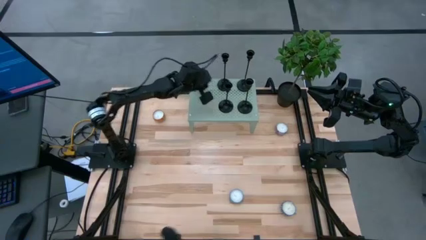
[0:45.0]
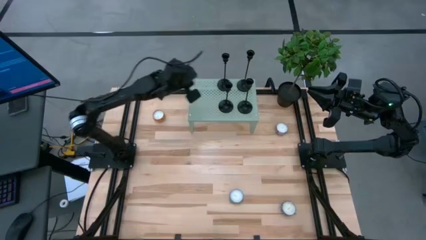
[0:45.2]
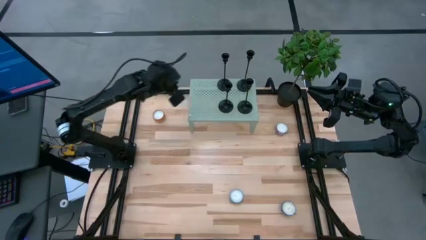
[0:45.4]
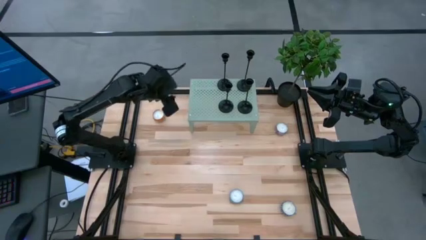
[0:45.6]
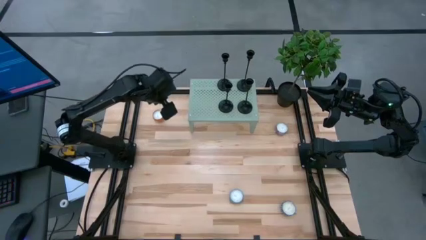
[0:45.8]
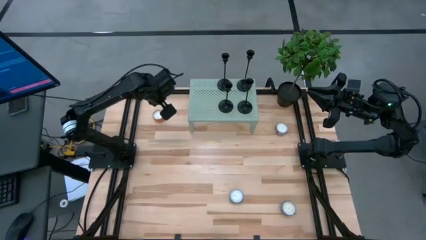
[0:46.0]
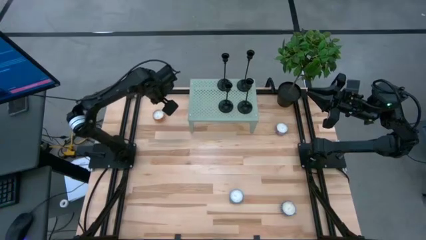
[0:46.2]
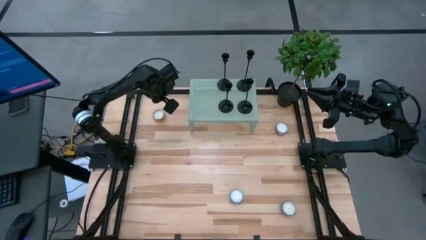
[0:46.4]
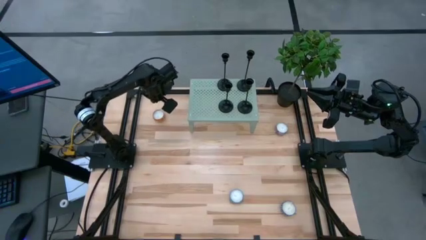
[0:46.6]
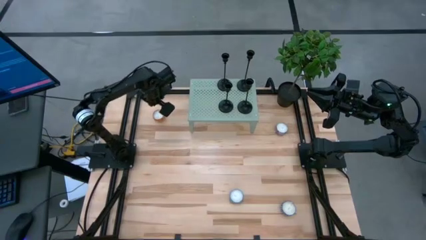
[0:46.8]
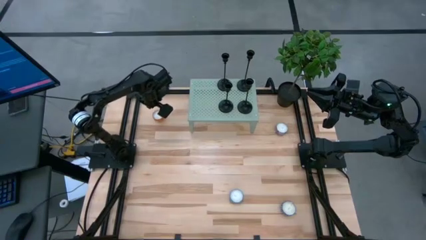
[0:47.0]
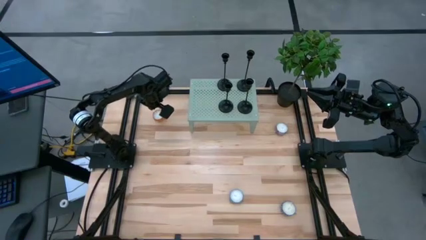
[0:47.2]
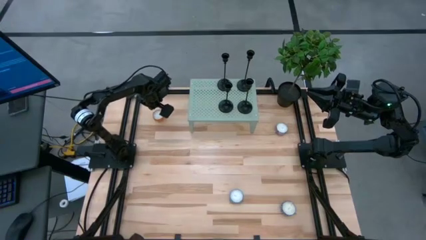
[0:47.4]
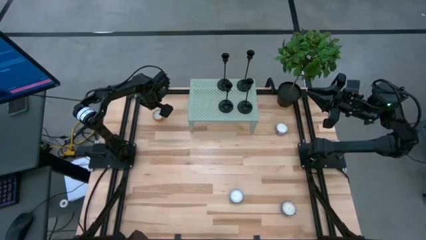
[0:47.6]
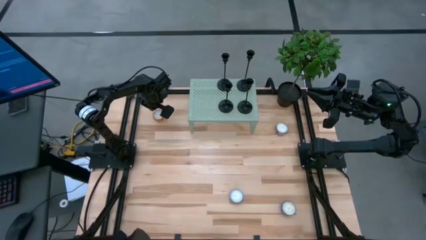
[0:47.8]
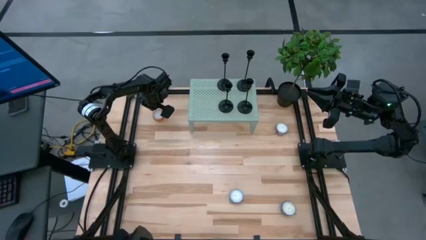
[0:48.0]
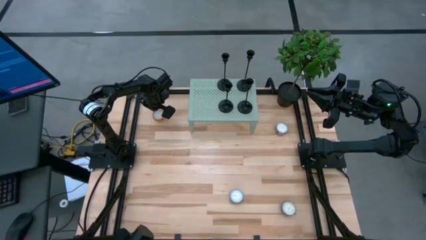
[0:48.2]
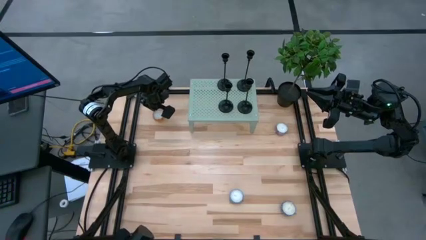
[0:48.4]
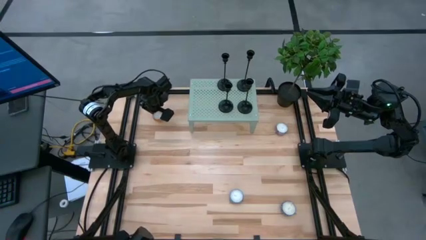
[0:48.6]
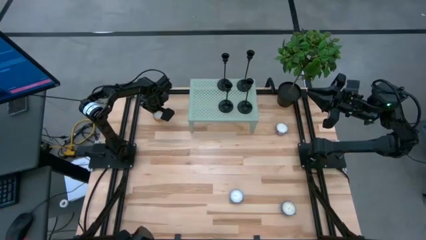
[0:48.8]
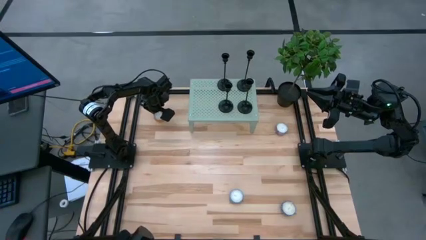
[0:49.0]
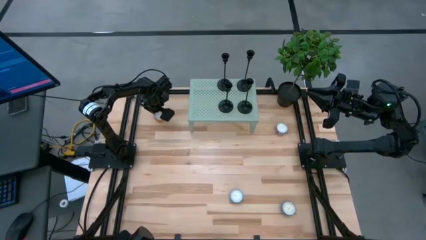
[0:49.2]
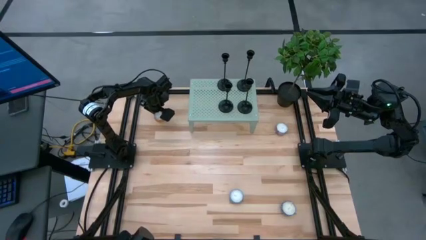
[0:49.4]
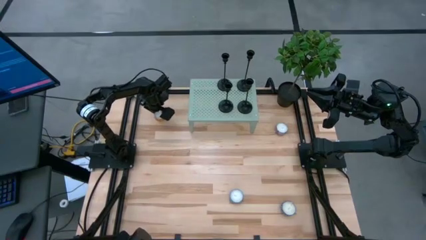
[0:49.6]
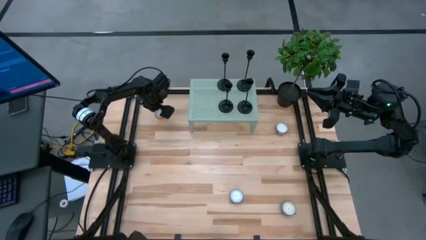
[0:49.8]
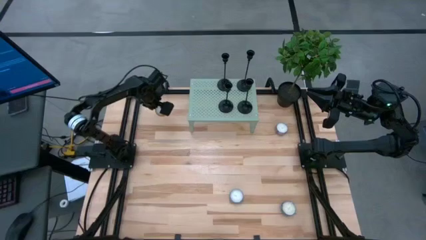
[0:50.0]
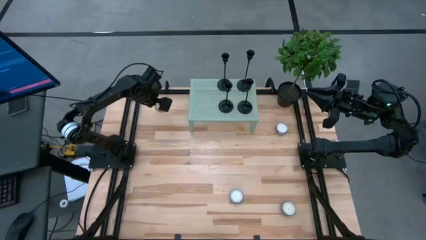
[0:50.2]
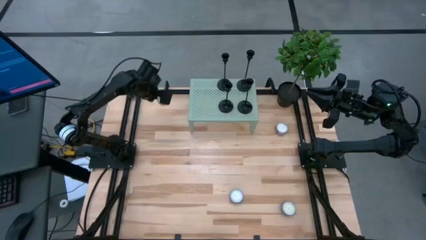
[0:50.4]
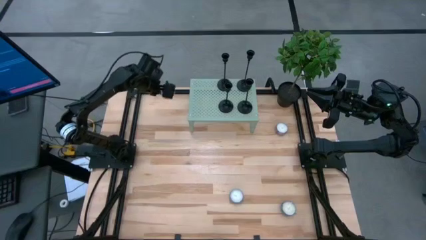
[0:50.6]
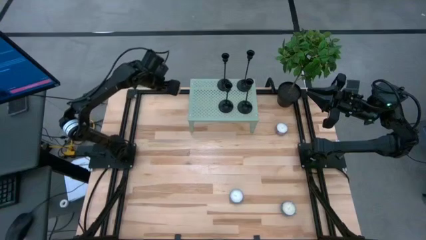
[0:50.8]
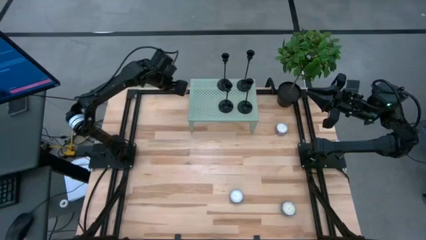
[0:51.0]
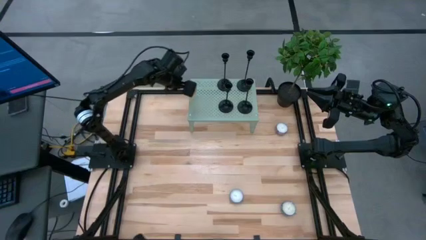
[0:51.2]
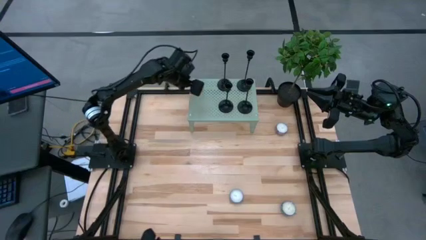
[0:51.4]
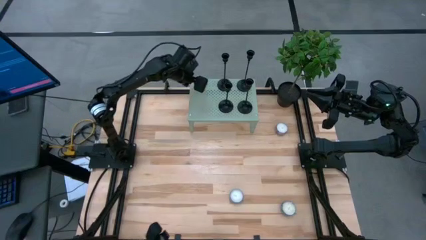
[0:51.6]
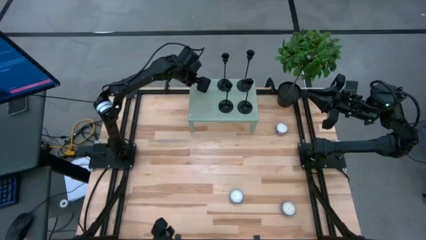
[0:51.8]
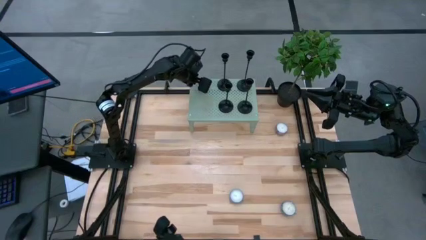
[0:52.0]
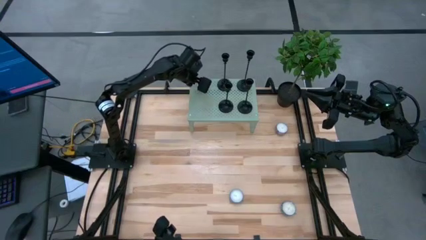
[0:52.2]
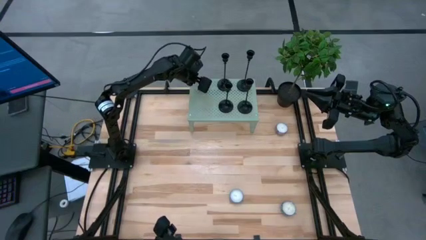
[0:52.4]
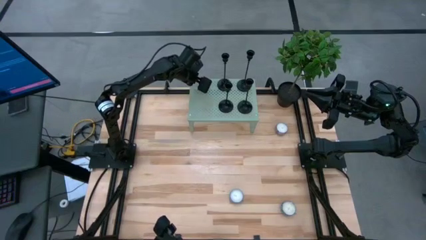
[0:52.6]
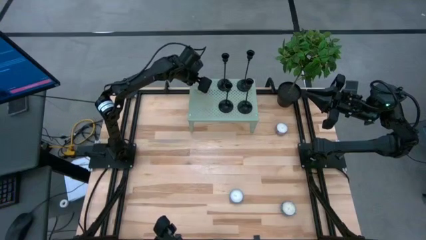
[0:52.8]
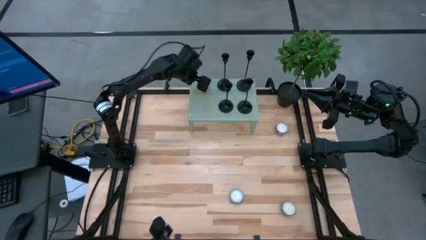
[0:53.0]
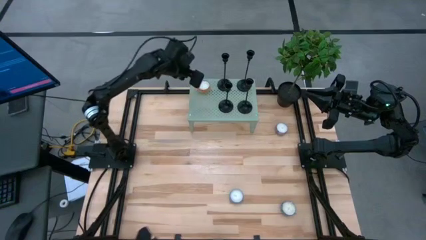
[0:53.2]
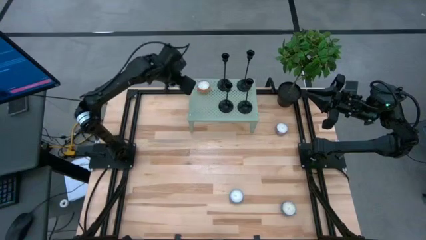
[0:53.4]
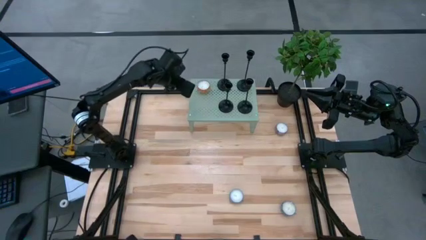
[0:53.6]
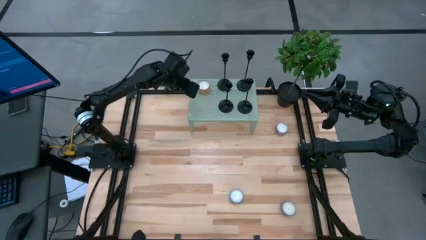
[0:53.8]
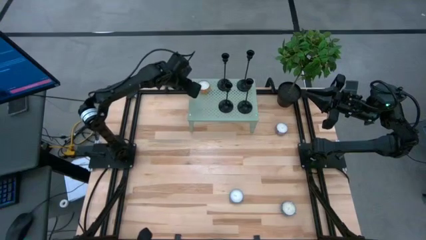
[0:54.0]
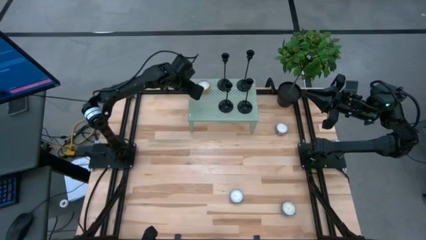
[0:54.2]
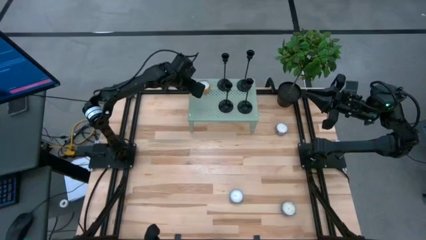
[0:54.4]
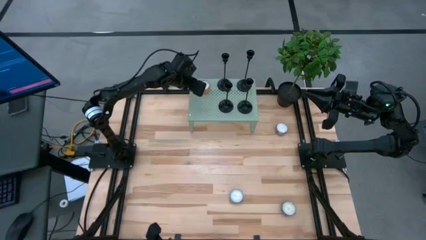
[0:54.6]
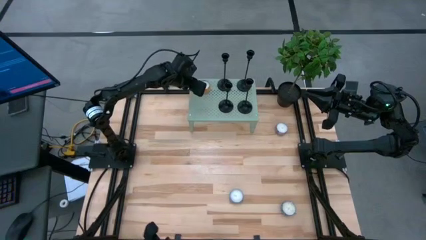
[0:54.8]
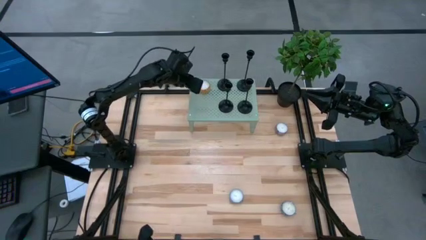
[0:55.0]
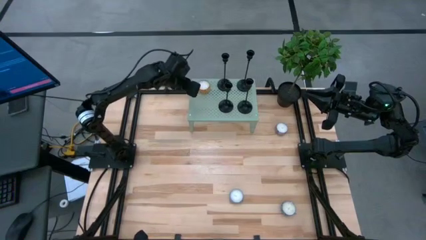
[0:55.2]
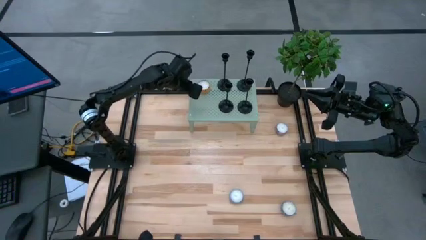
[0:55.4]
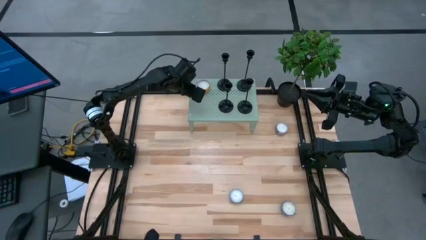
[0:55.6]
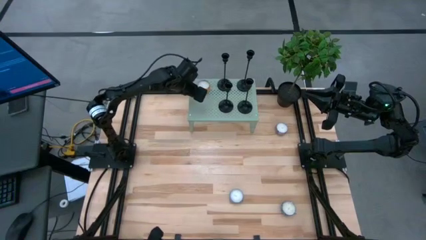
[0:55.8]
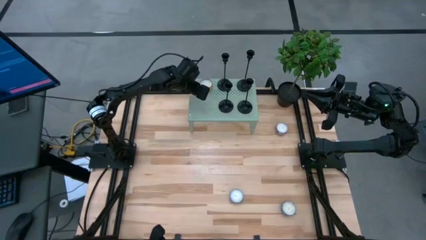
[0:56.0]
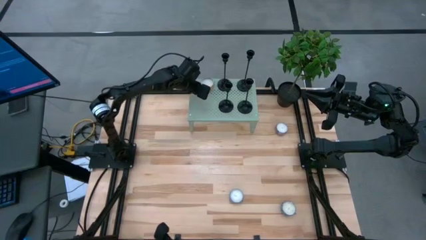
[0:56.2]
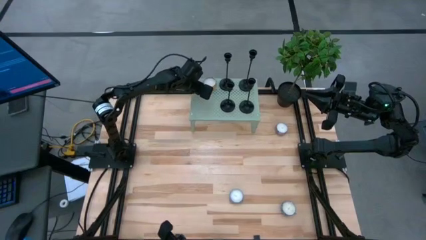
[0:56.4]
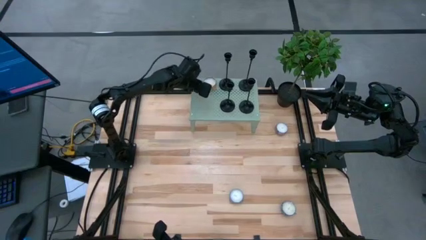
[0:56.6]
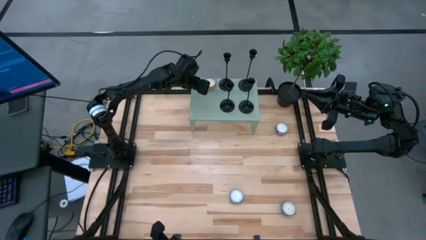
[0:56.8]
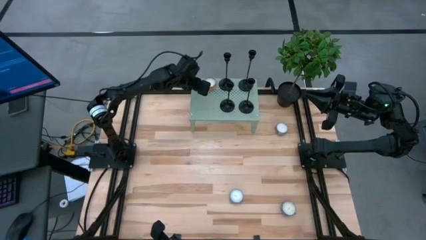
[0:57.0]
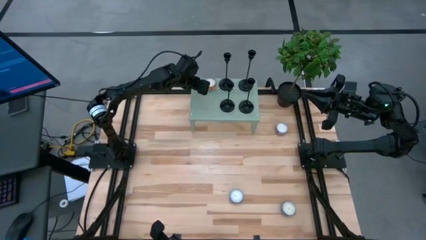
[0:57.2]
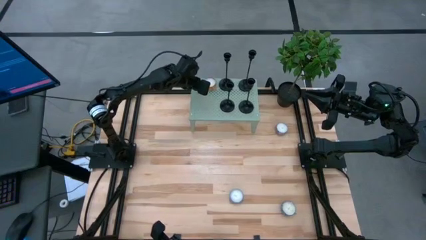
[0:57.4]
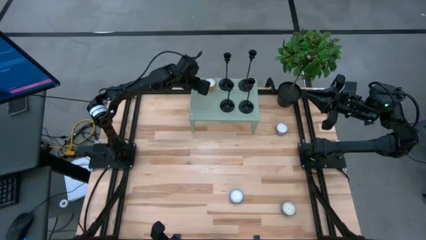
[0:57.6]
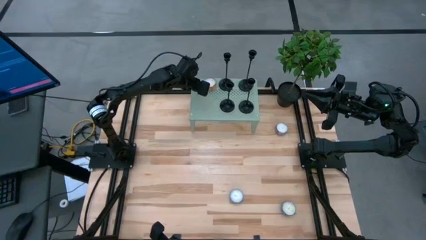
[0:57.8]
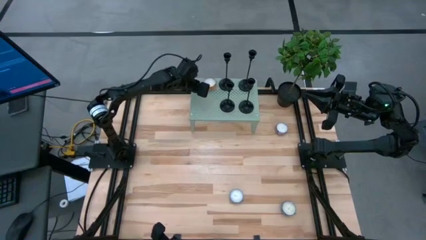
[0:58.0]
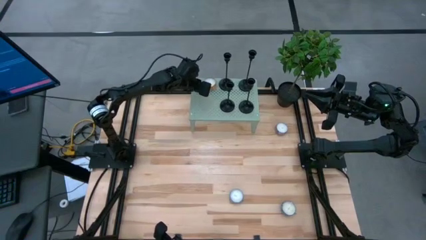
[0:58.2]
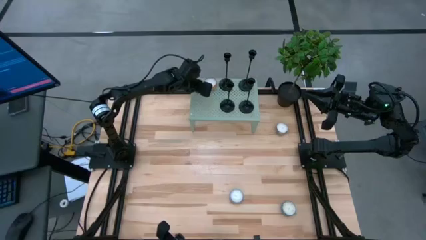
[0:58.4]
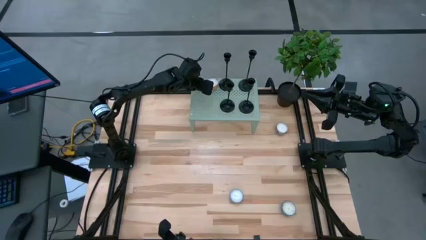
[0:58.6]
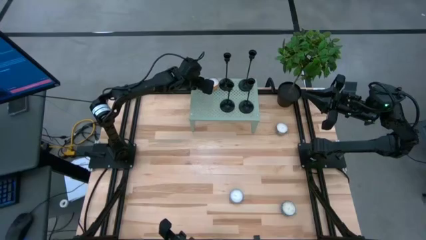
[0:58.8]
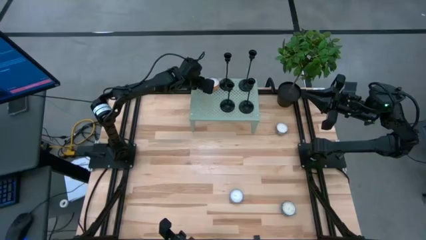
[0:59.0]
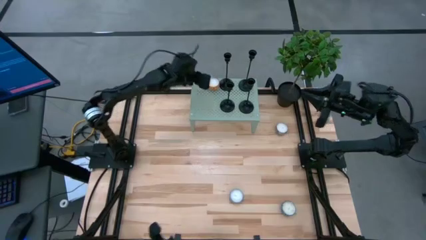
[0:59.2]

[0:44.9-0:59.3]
Task: Pick & Place candle stick holders
Put the yellow scented candle on the shelf

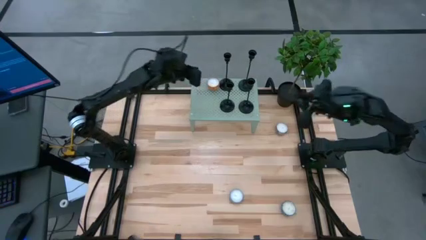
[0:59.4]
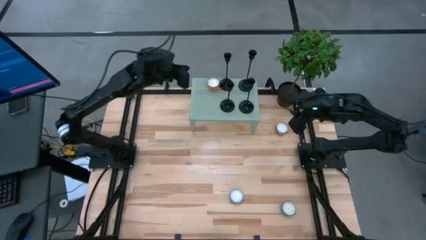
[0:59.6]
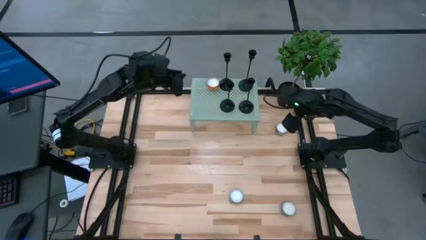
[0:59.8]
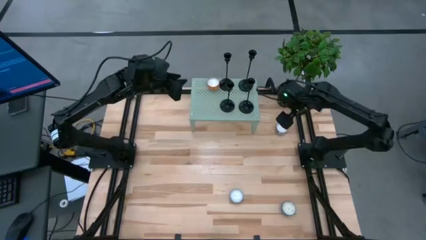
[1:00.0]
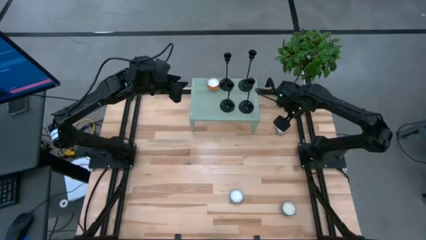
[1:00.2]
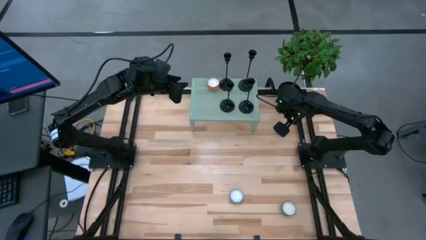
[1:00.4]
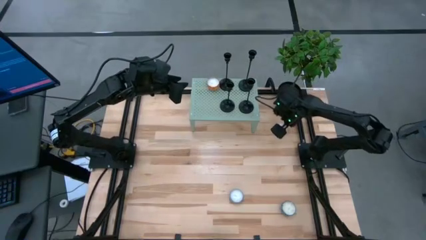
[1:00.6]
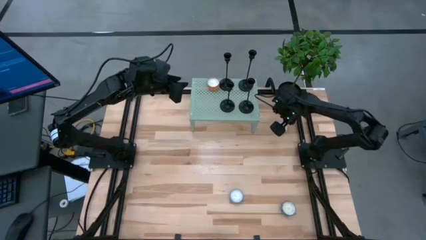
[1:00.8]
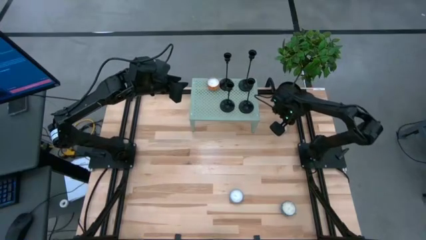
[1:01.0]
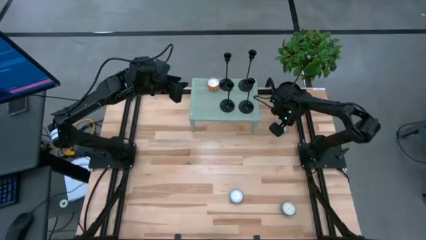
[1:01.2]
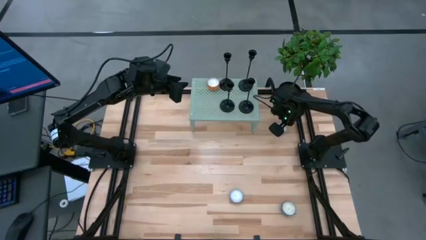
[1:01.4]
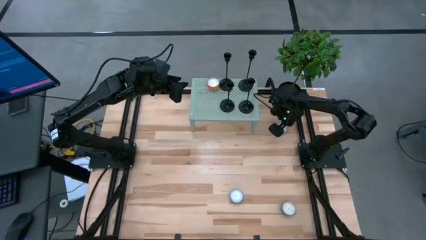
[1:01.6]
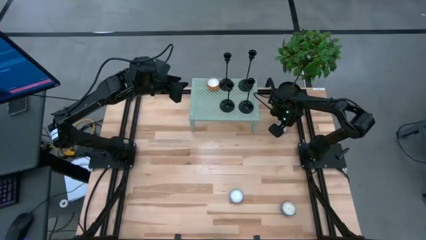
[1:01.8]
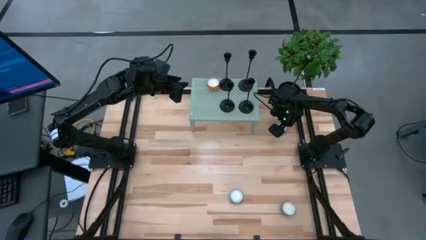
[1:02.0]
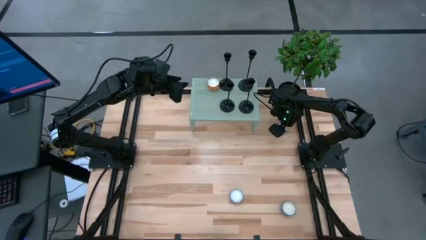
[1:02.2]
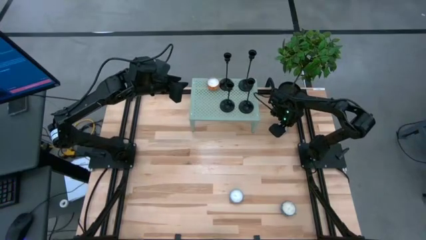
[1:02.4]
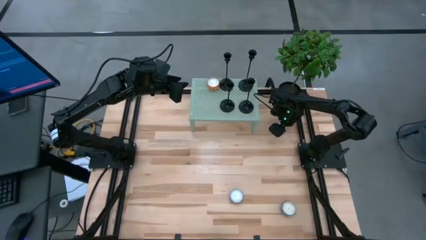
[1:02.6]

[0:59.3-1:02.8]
Put the red scented candle on the shelf
